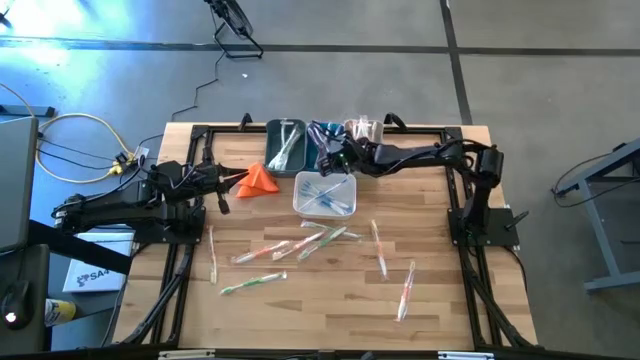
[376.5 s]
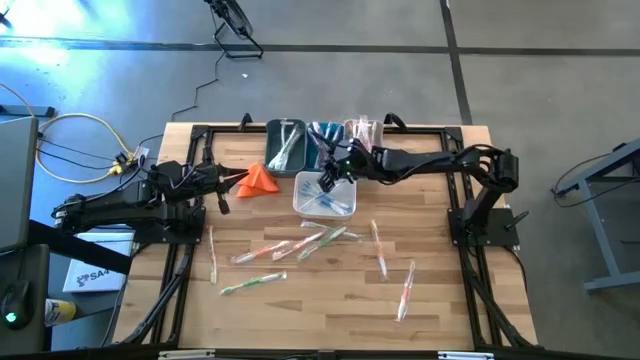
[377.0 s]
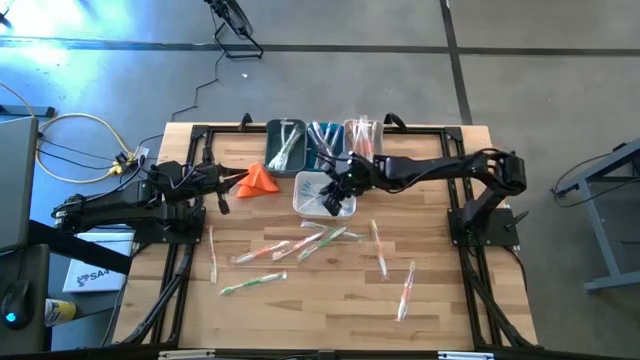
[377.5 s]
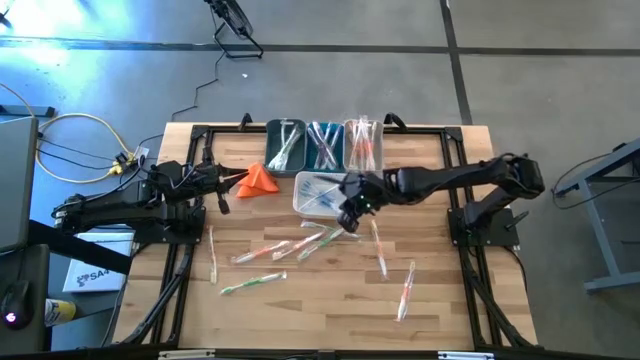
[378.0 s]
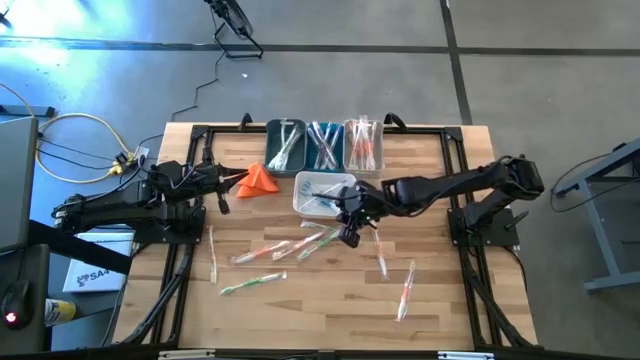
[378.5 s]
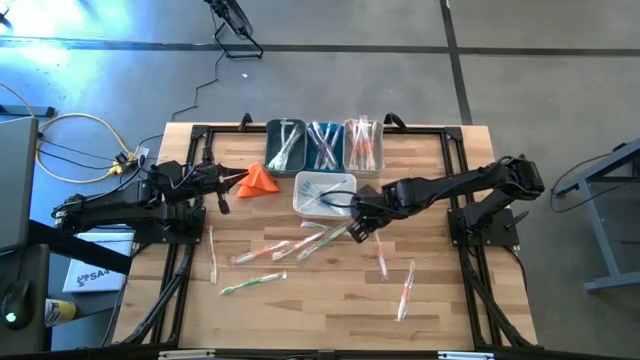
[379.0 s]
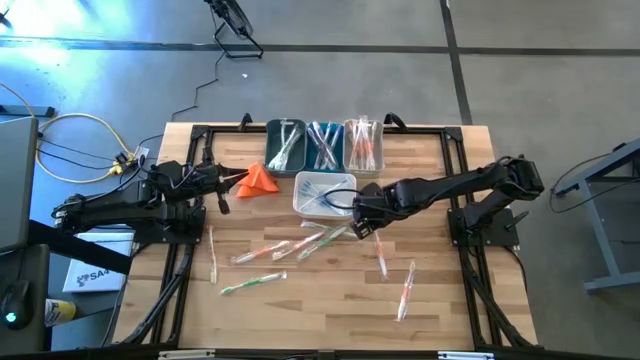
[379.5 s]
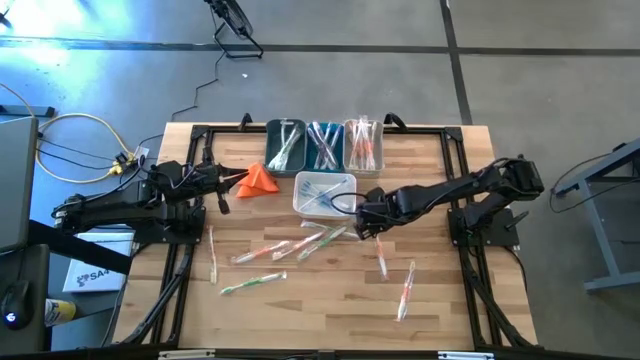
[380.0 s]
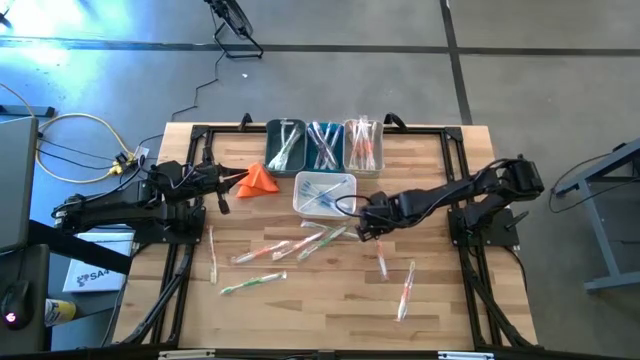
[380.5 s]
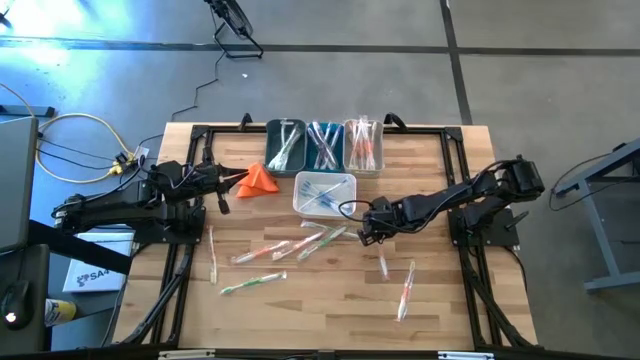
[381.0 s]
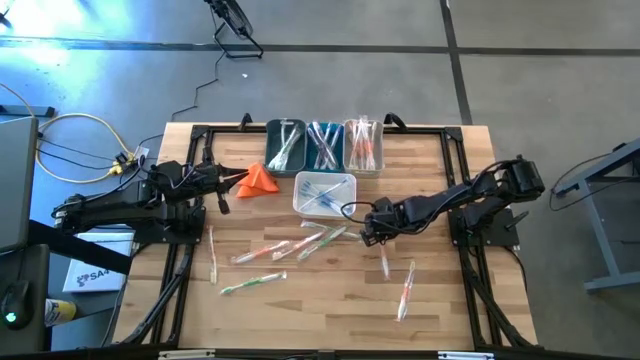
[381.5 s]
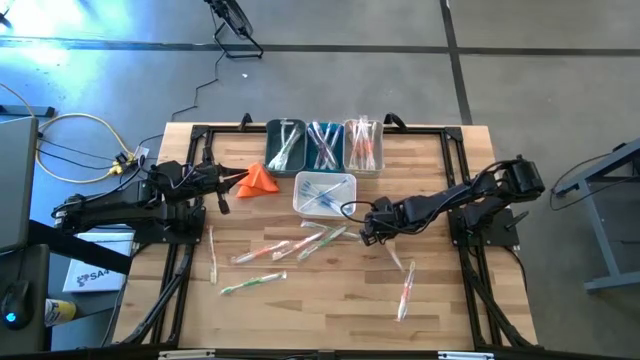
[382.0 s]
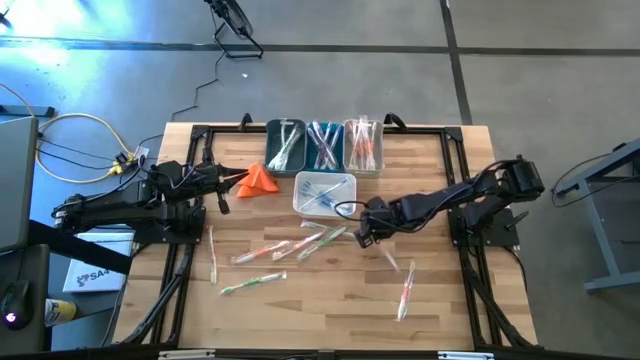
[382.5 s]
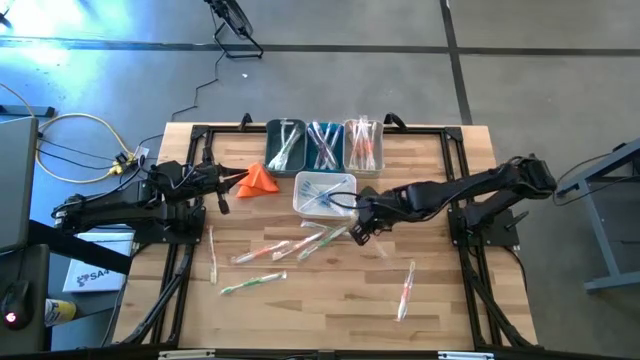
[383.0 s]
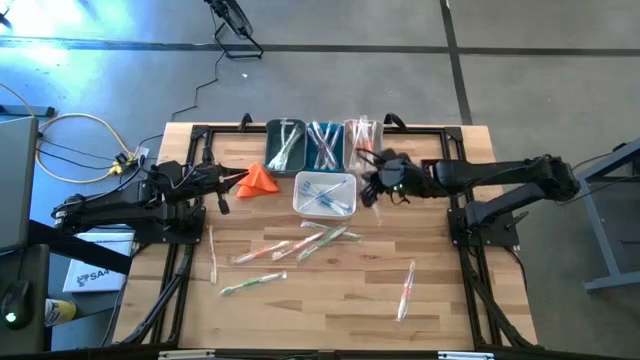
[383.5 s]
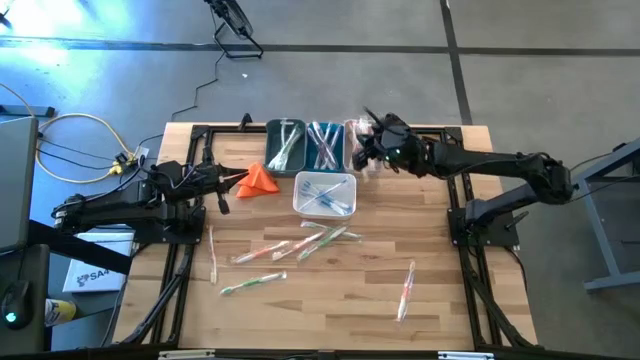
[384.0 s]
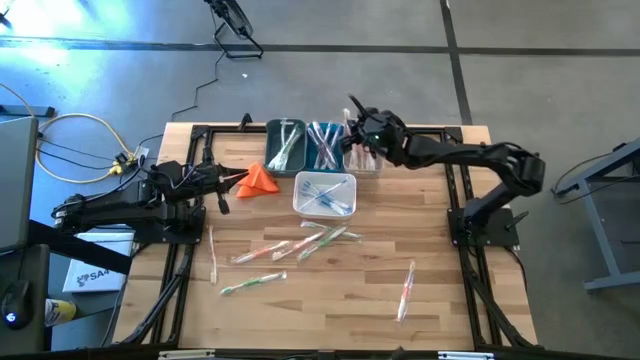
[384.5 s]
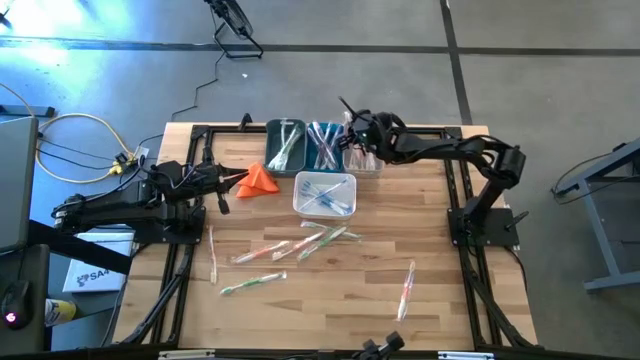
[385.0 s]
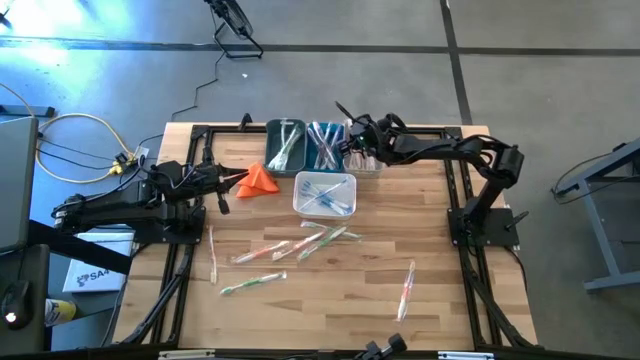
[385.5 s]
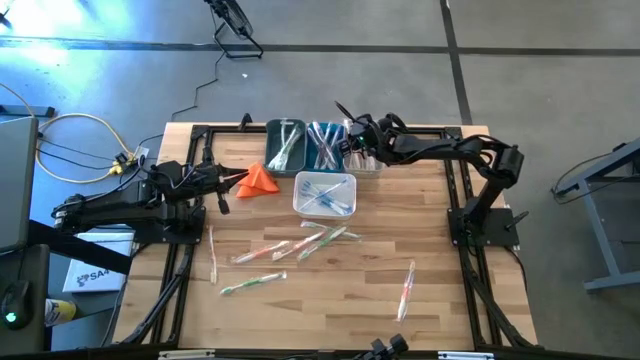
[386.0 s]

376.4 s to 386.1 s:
Task: Pick & Place Toothbrushes
Put the orange toothbrush into the gray bin

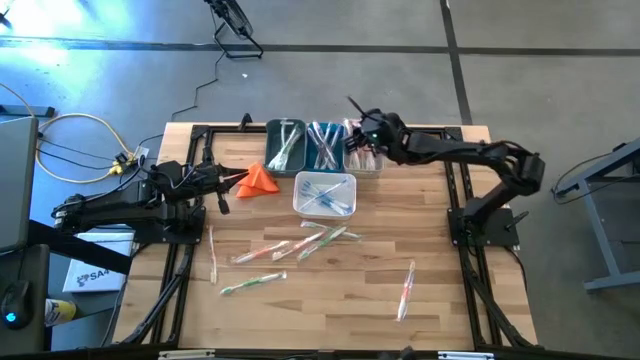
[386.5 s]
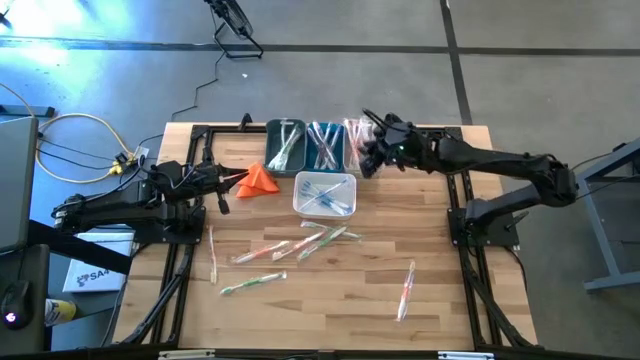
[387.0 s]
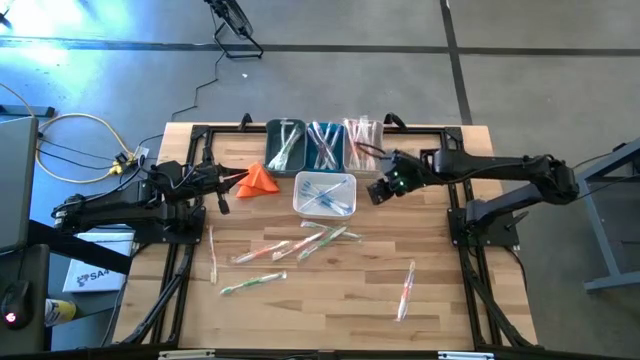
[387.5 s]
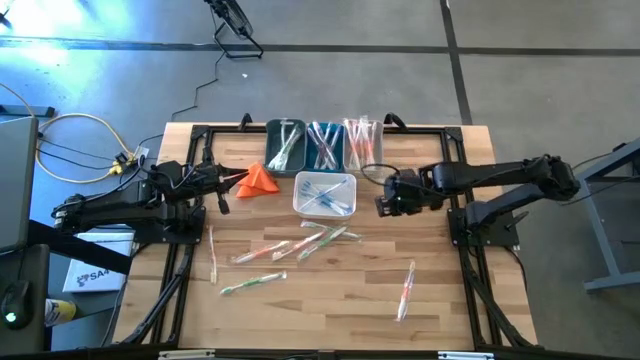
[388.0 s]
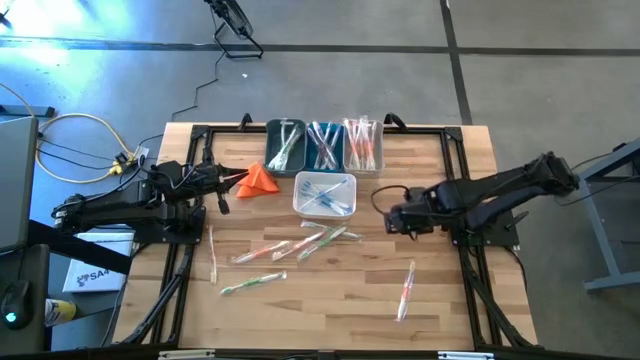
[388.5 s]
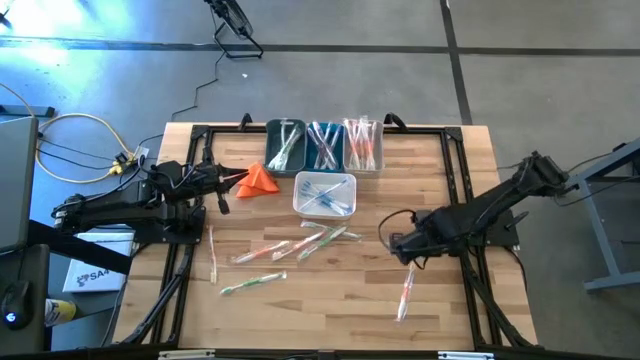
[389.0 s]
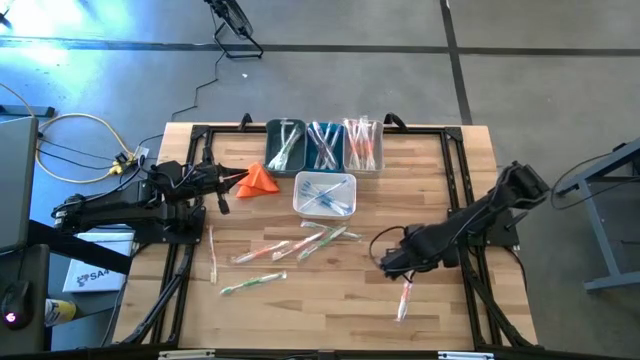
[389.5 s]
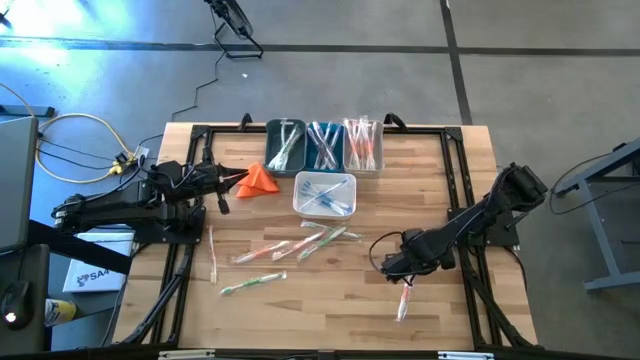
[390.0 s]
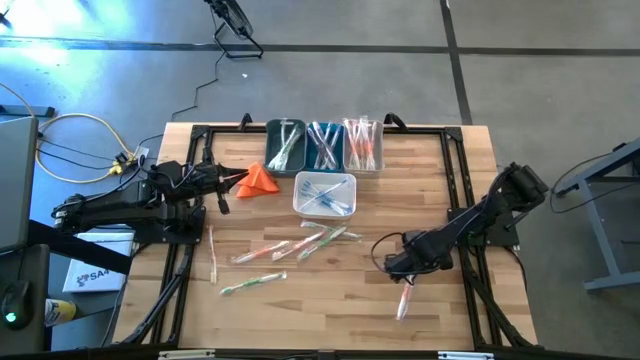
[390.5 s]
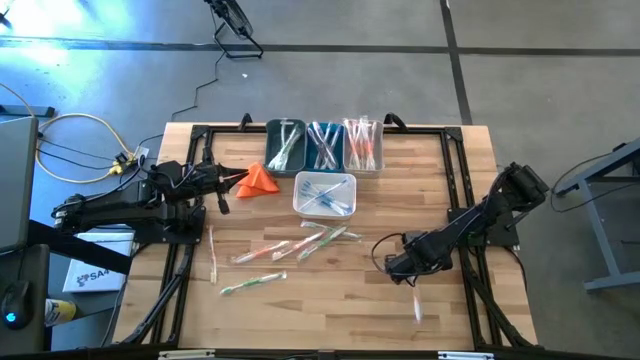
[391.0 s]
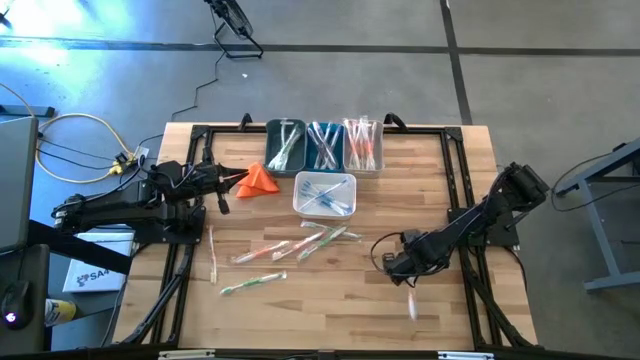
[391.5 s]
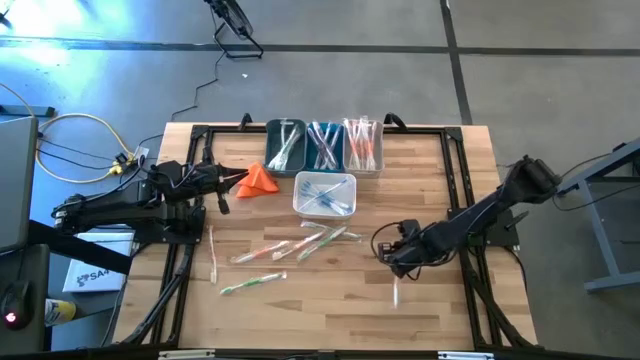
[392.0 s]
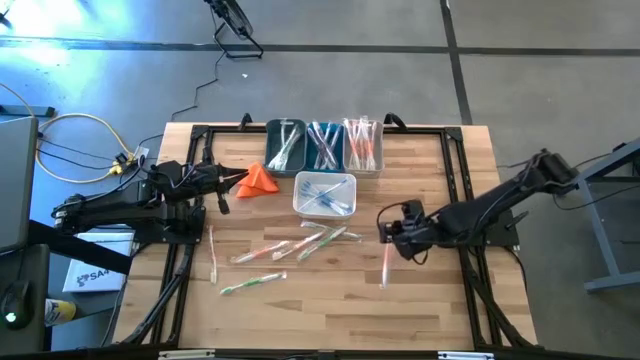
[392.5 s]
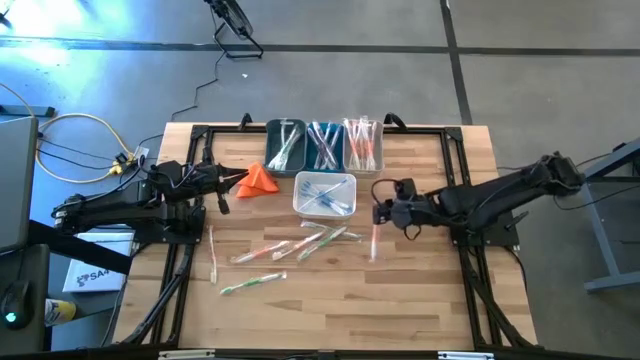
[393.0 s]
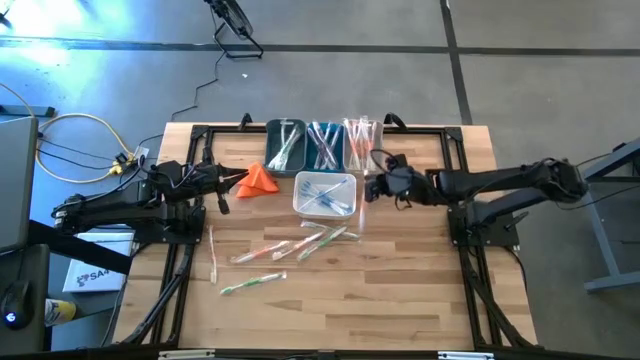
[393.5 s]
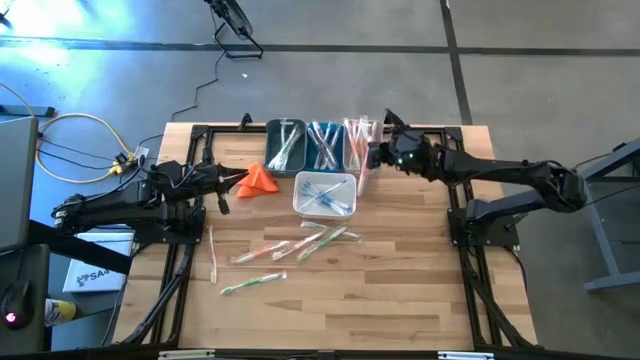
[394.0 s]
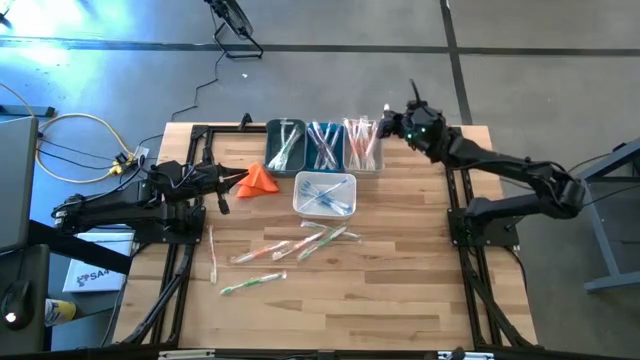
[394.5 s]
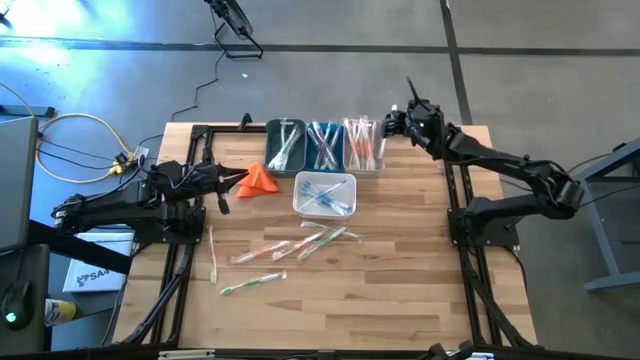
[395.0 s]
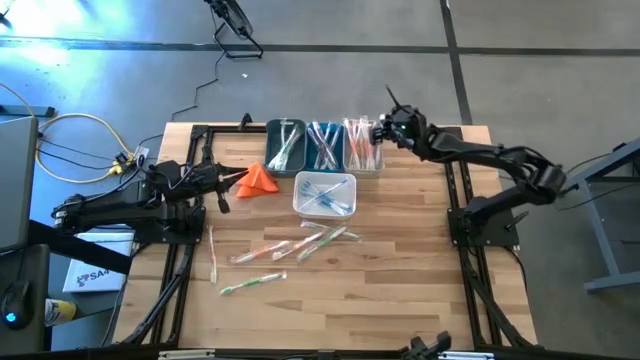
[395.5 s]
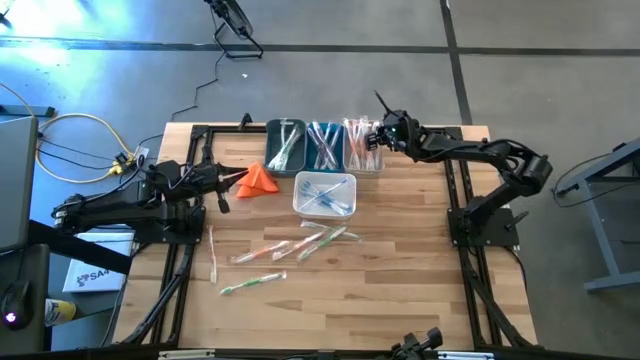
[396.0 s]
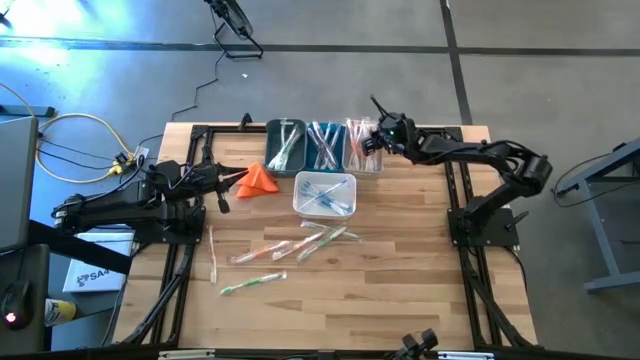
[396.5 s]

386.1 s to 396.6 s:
Put the orange toothbrush into the gray bin

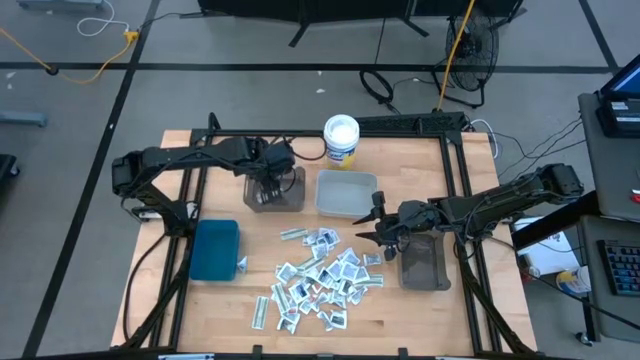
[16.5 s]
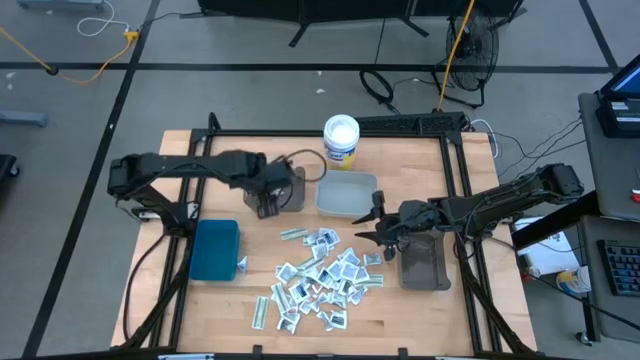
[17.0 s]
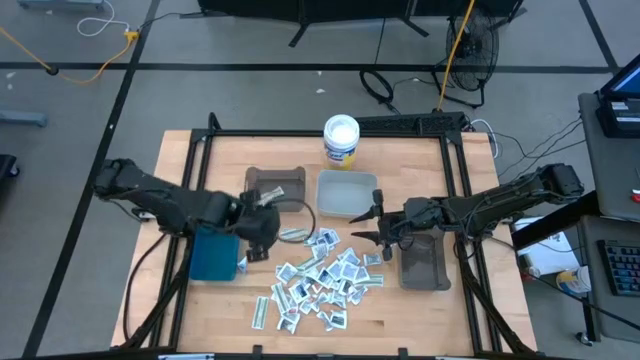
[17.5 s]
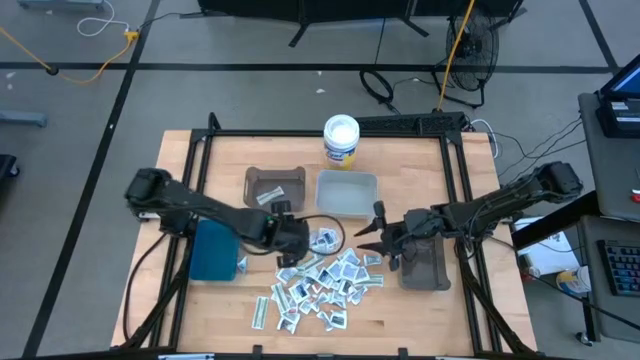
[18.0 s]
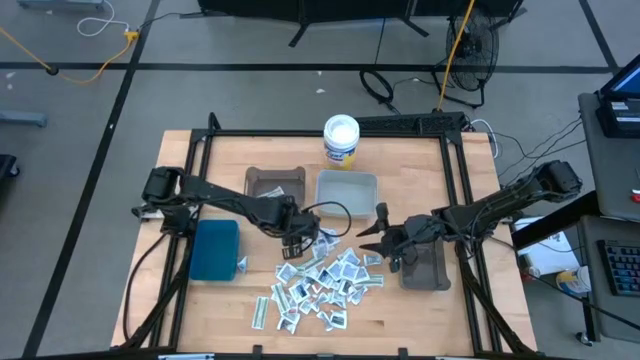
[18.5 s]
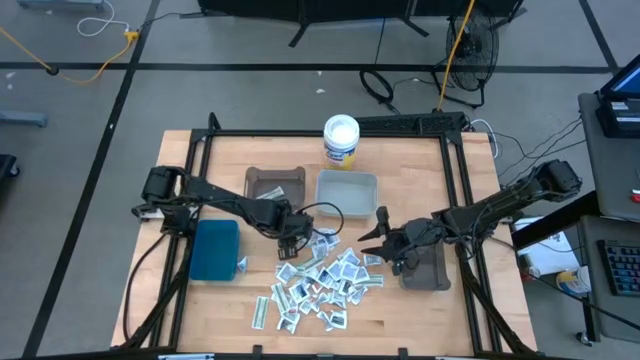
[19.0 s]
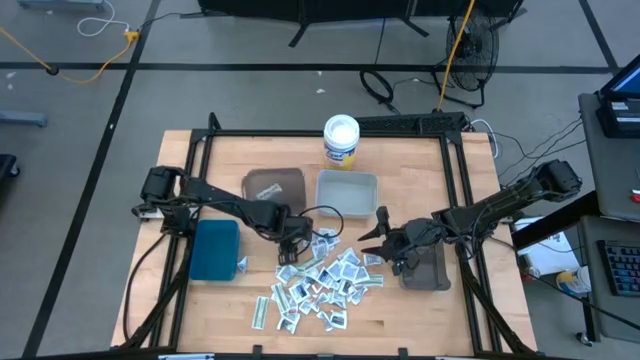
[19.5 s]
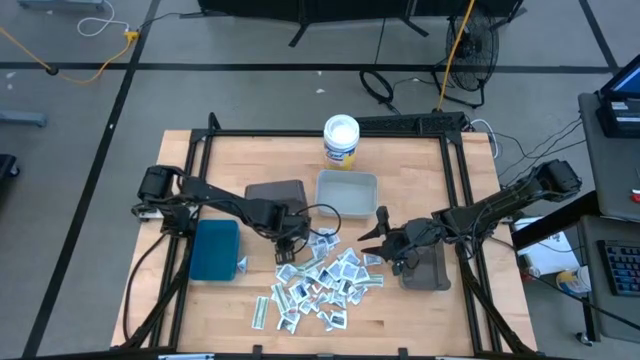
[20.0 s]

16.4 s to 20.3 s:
Task: Pick & Place First Aid Supplies
Put the green bandage pack into the top black bin
